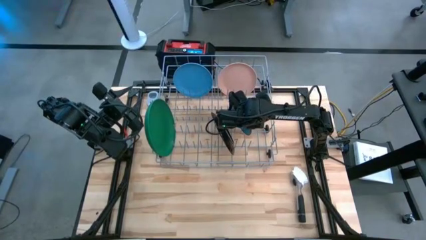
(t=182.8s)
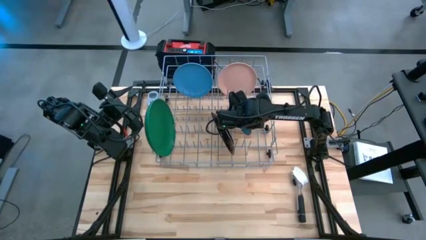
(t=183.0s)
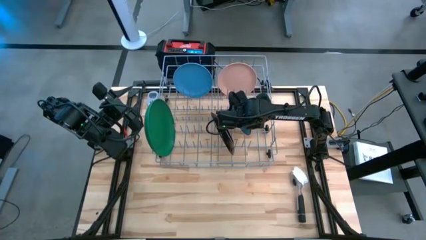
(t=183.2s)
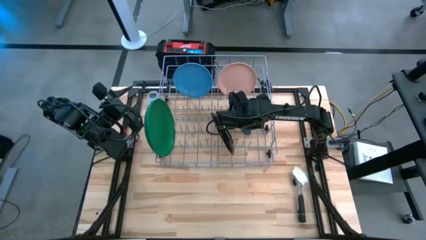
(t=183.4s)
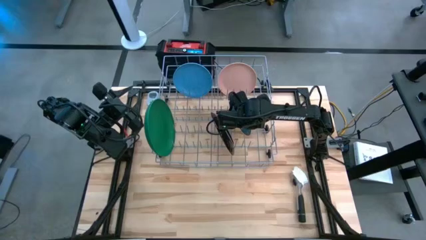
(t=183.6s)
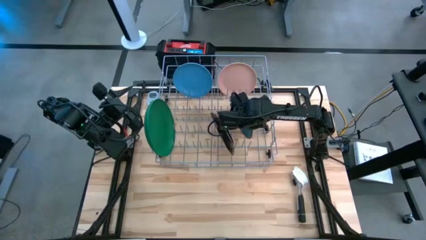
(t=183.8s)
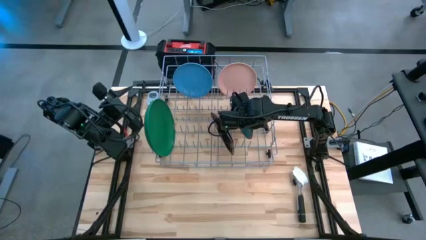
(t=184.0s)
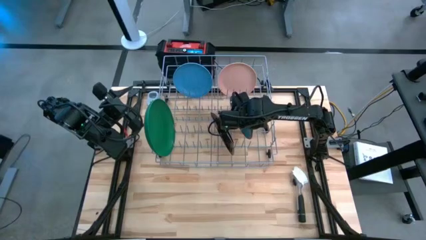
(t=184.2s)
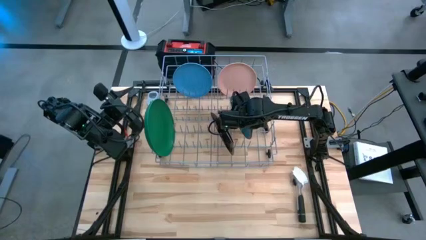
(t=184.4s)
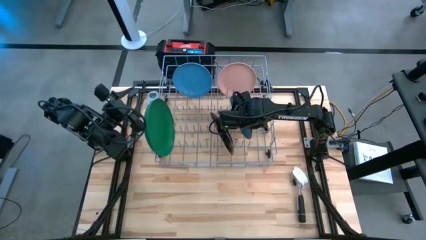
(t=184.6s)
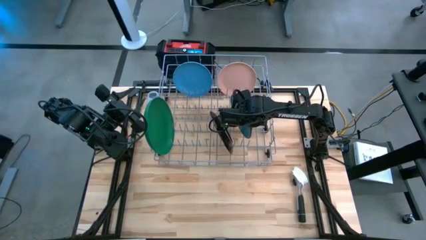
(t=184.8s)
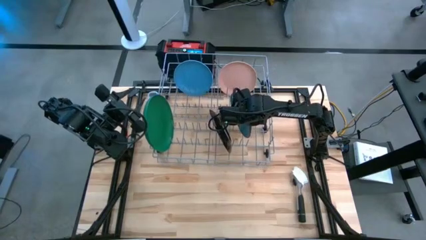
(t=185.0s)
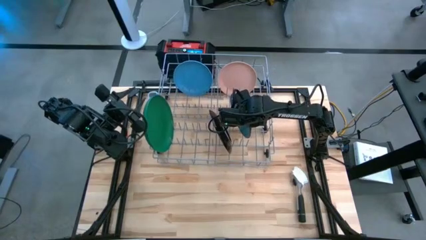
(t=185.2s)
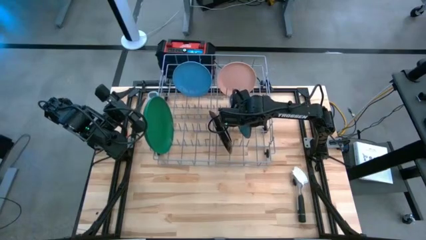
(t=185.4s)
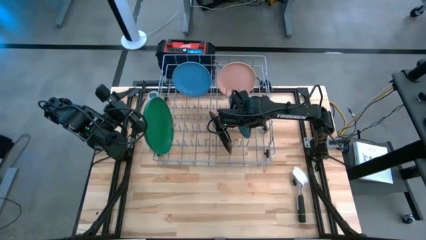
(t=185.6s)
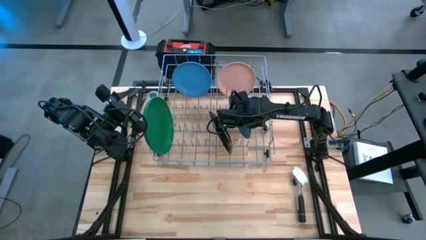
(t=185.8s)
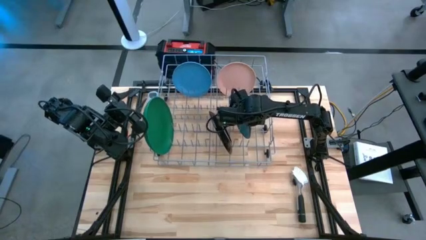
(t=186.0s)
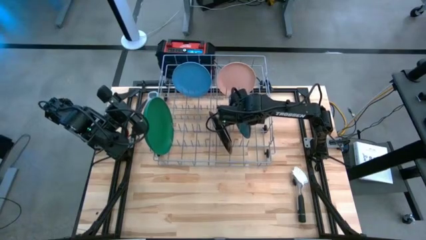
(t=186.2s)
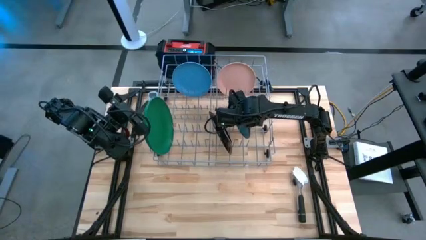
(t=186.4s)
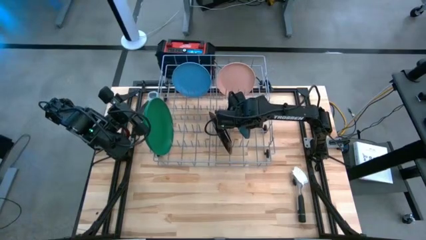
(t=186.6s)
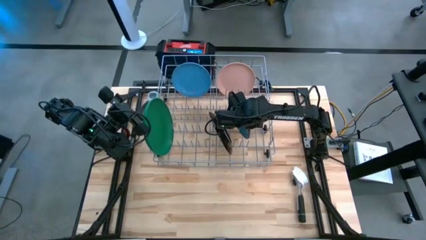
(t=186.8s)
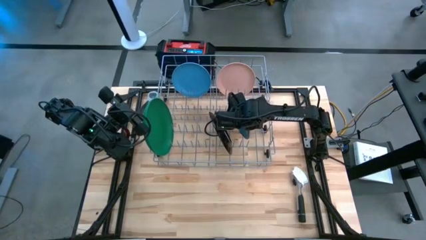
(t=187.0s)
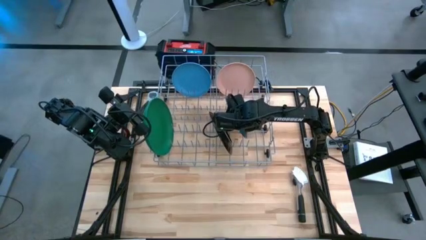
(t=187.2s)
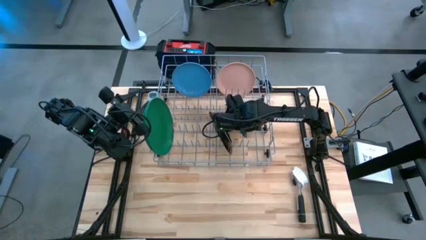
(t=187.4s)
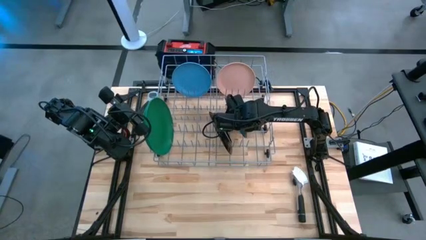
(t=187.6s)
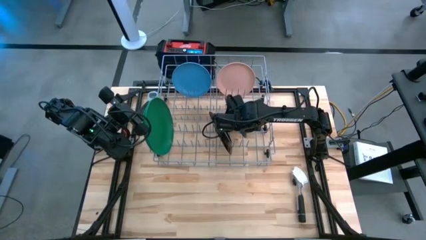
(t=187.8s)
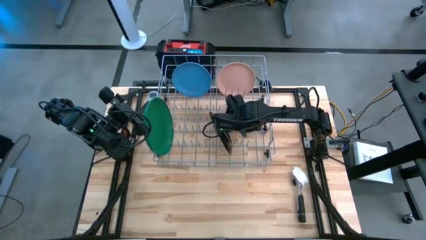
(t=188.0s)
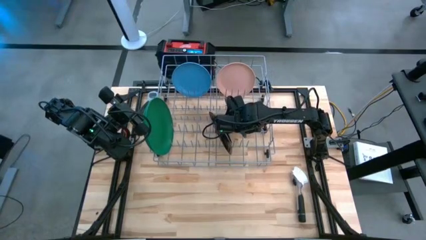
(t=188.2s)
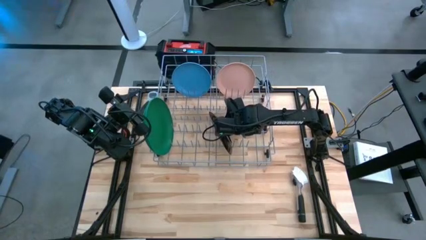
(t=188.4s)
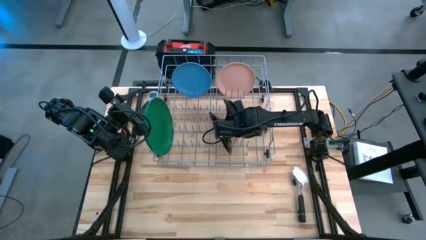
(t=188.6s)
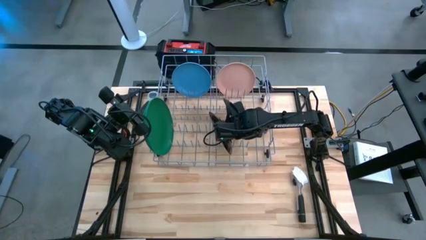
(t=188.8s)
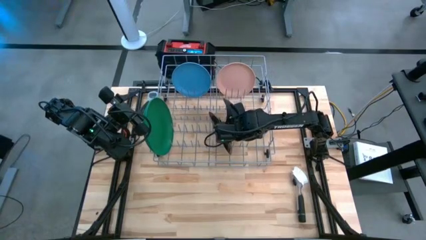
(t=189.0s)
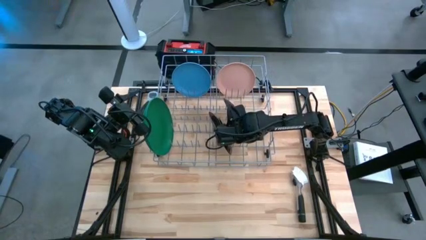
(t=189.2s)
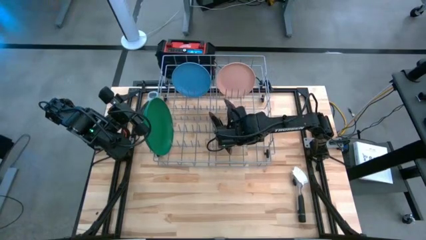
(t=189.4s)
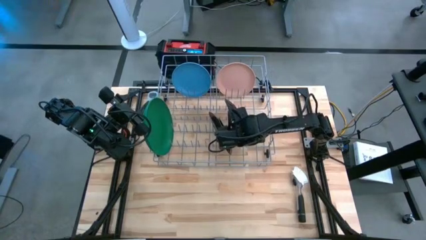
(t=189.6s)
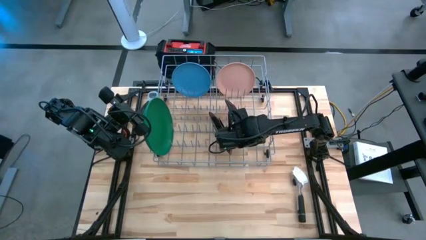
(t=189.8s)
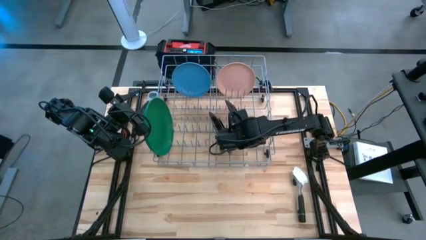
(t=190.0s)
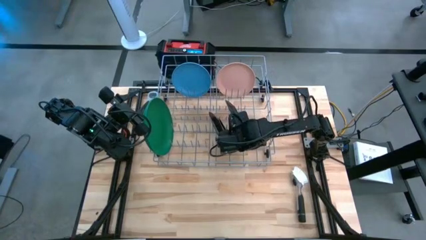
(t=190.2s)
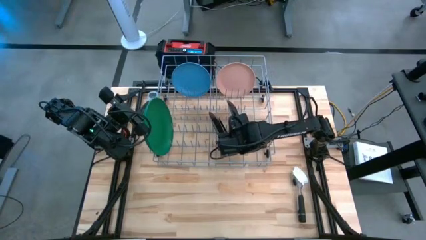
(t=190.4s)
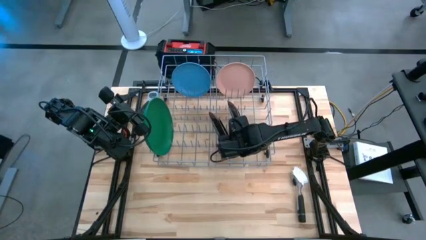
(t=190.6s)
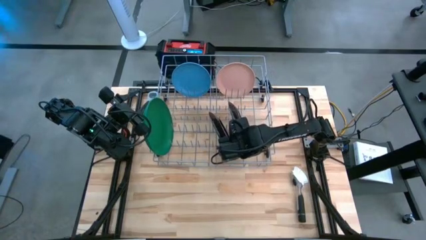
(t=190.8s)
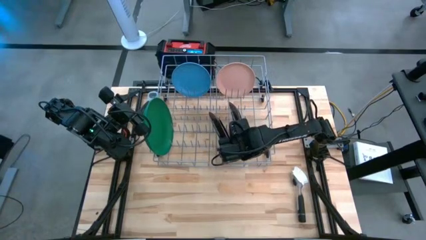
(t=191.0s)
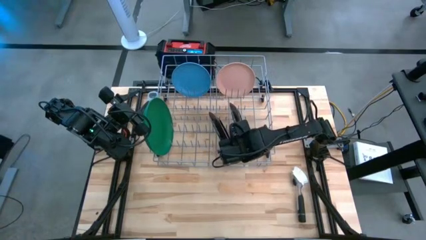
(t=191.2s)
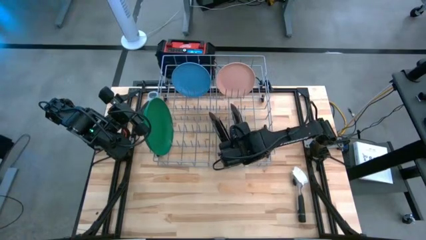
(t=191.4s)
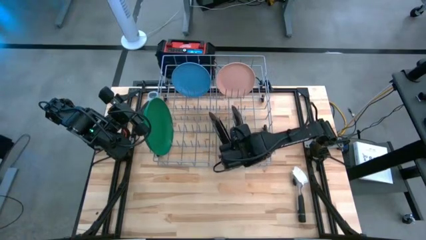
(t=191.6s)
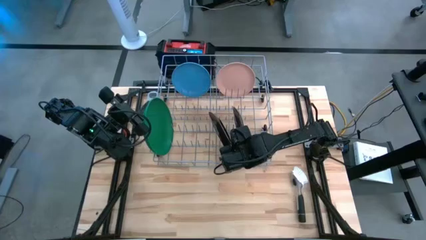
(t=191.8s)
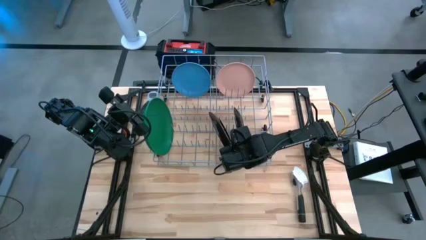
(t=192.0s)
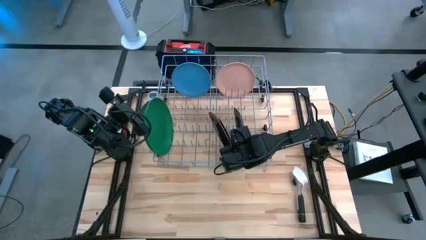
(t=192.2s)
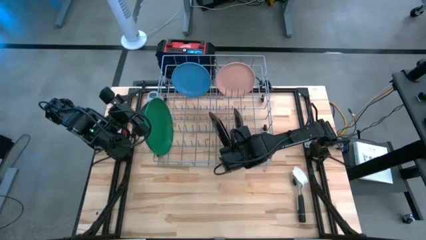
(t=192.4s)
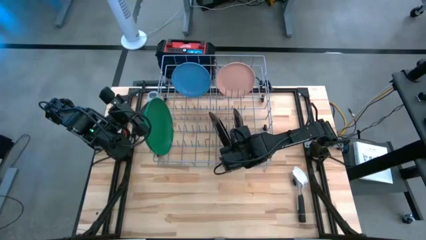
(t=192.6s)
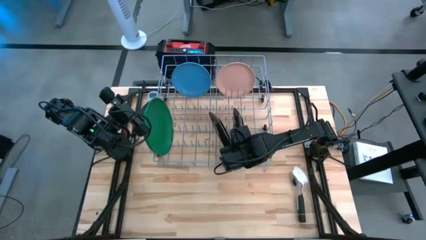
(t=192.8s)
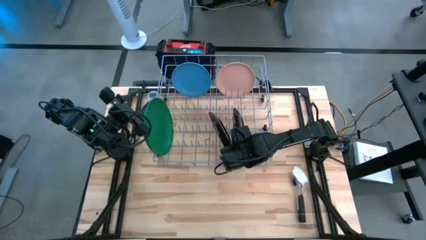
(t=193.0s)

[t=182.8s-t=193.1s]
Task: Sort dishes
Adjust the blue floral plate on the right side of the dish rack

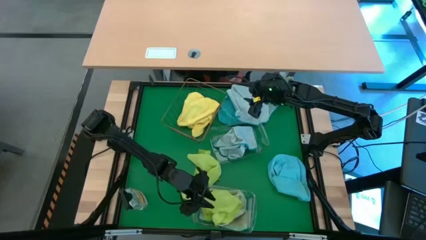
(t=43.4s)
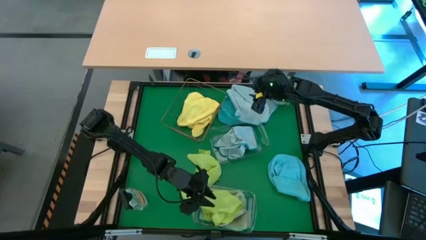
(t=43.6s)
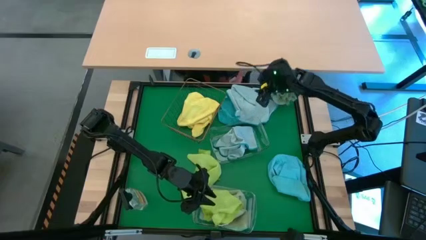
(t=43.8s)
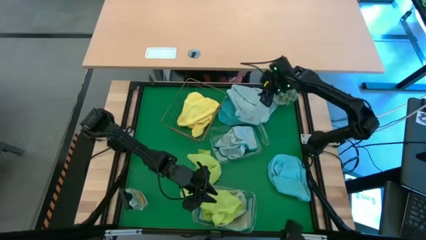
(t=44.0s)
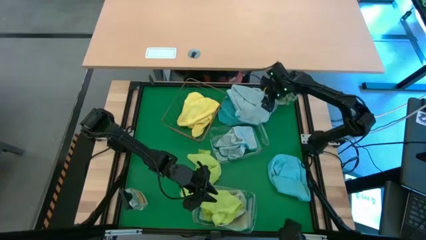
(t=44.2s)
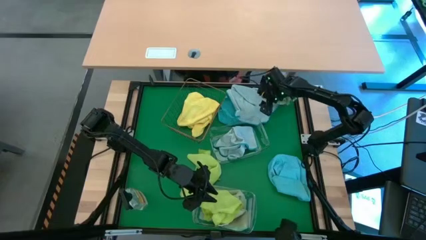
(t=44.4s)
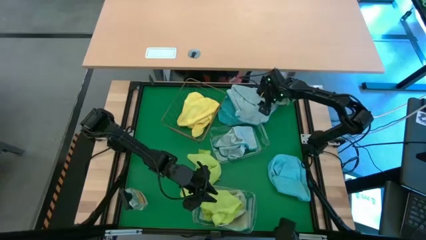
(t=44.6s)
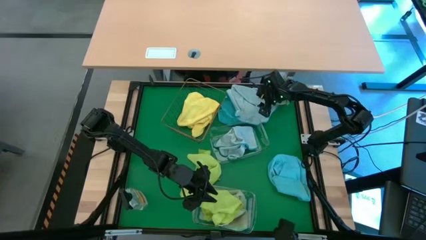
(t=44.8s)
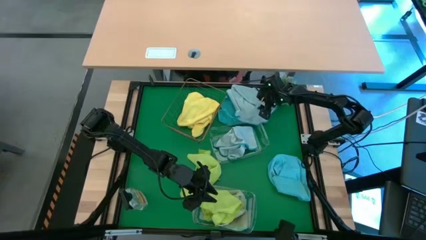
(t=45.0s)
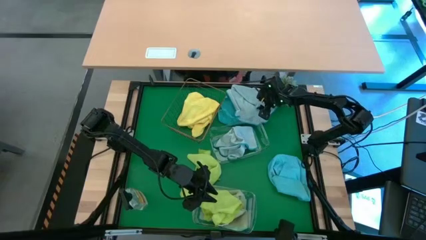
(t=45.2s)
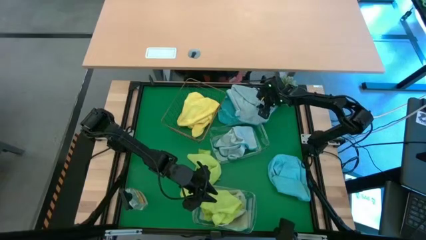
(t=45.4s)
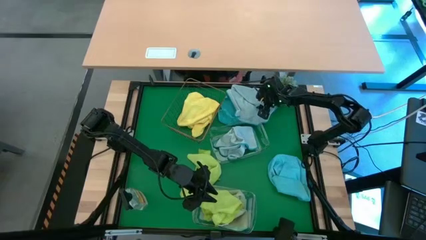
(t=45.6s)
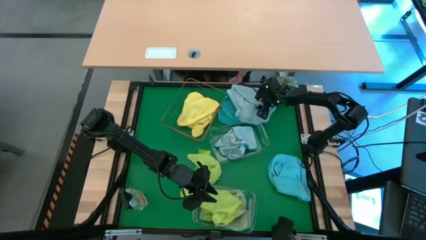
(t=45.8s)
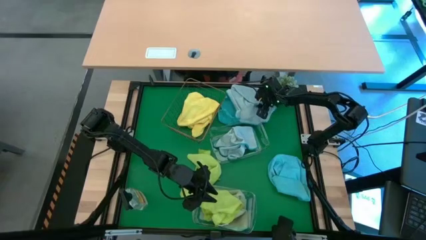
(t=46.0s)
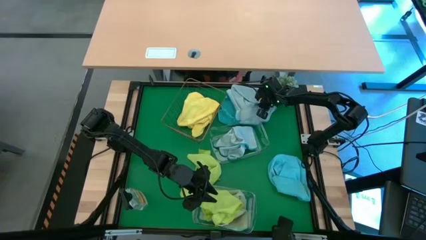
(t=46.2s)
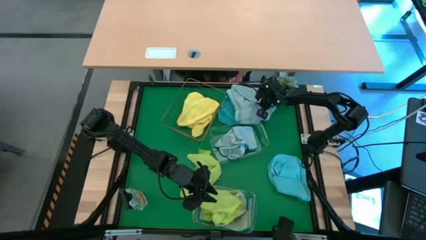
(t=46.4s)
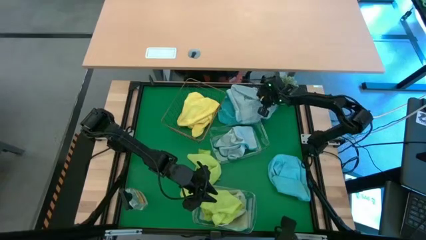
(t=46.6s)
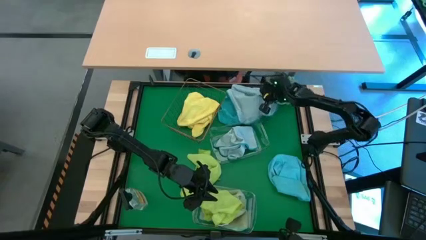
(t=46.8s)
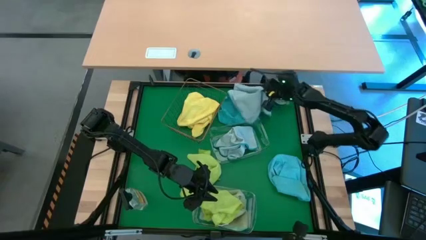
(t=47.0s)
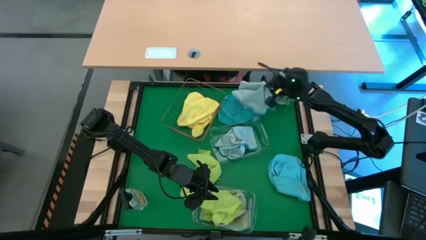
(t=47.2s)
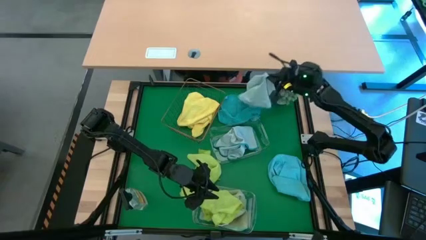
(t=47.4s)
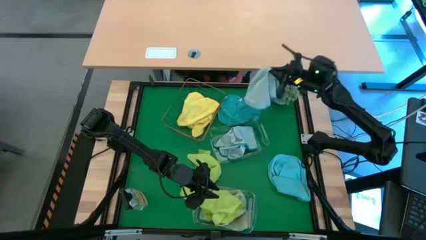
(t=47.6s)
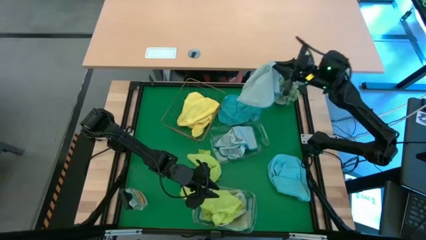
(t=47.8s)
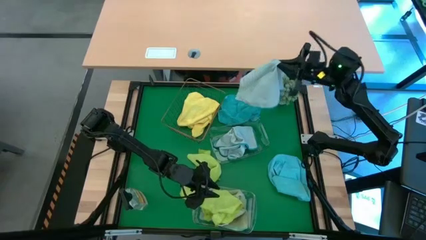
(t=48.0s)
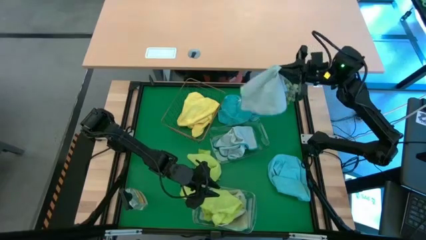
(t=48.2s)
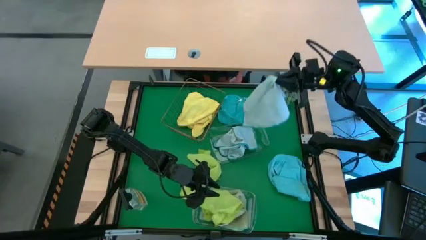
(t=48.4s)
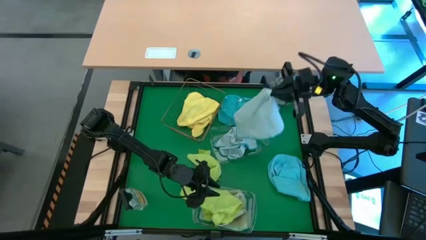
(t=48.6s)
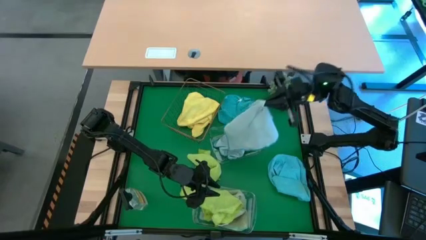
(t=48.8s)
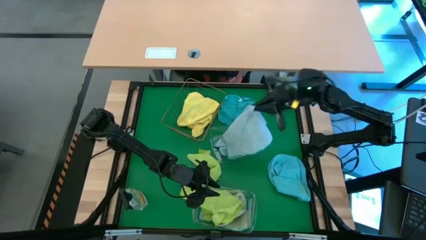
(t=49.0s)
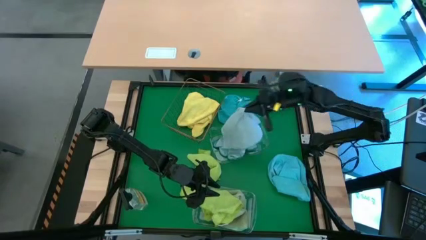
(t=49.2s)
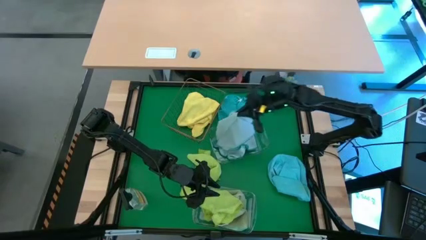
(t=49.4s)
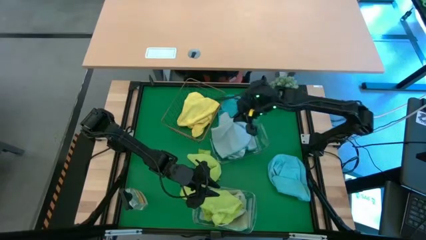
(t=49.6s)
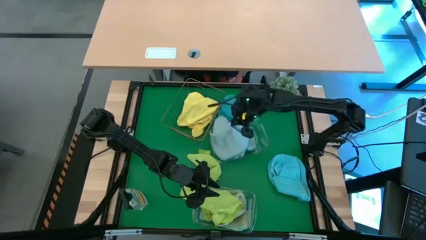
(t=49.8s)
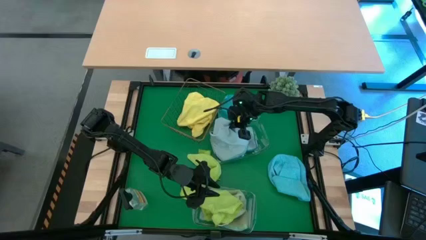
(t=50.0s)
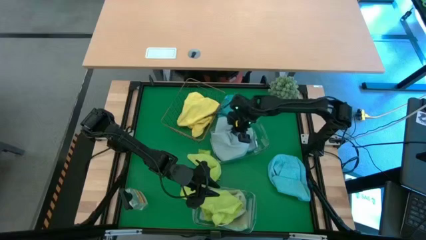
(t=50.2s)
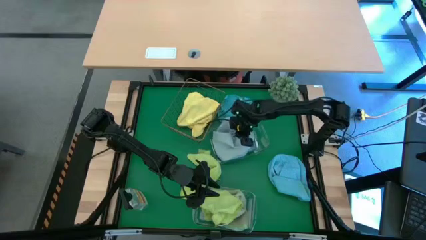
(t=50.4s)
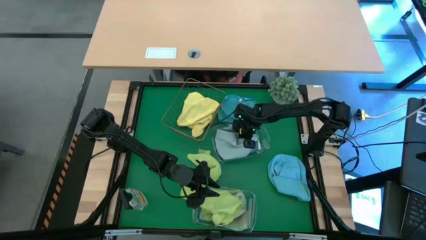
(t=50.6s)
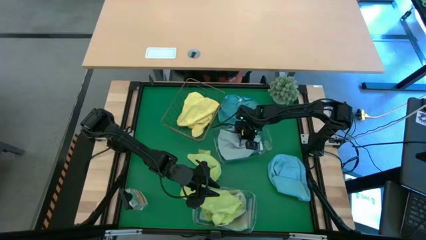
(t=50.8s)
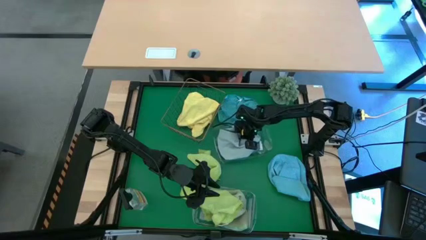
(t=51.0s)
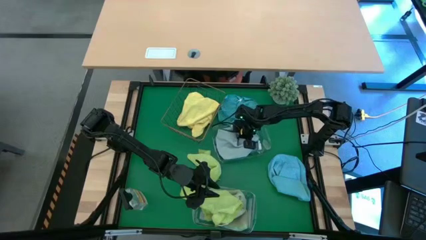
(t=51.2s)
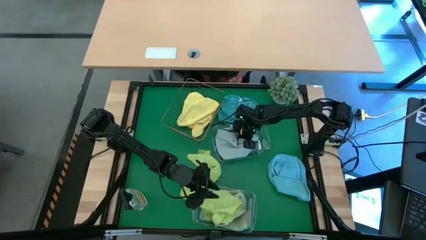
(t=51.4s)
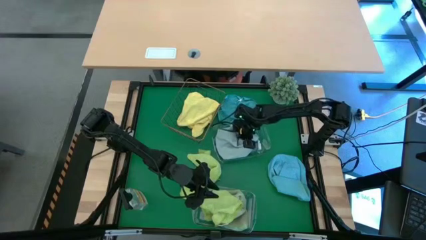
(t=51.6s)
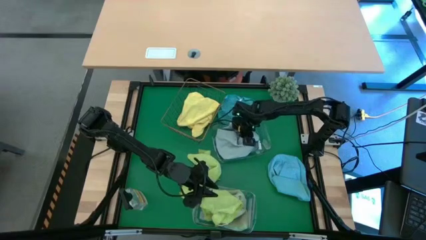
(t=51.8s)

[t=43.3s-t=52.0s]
Task: Sort microfiber towel by color & place in baskets
Put the gray towel into the top transparent bin
